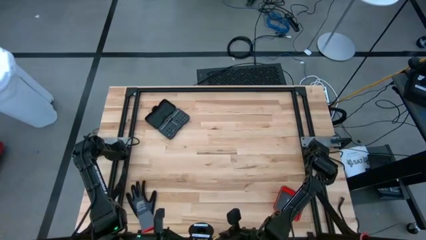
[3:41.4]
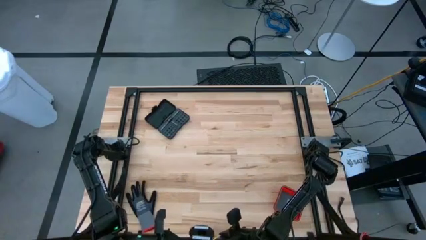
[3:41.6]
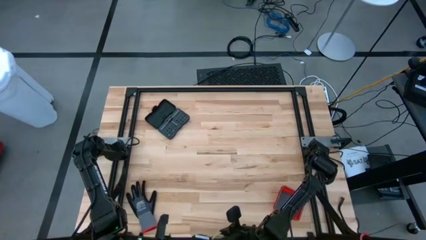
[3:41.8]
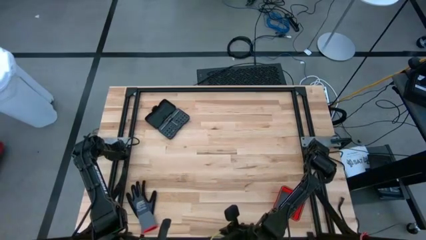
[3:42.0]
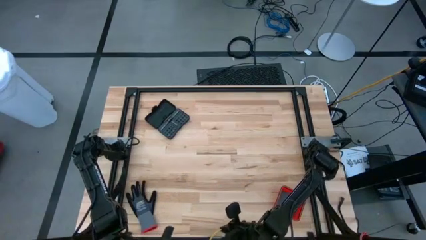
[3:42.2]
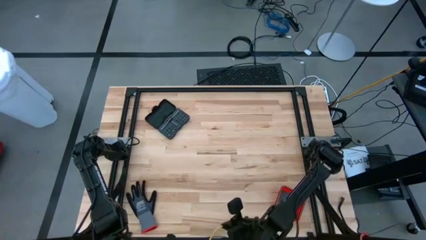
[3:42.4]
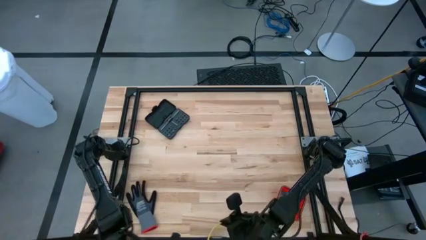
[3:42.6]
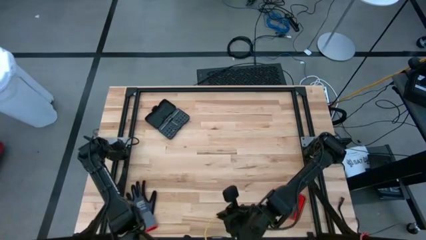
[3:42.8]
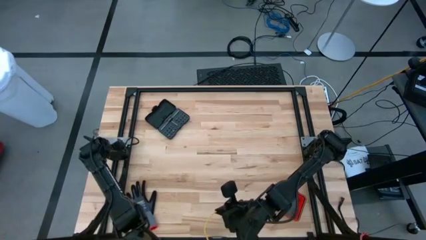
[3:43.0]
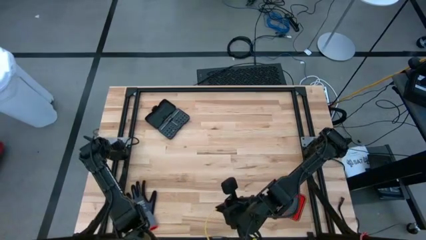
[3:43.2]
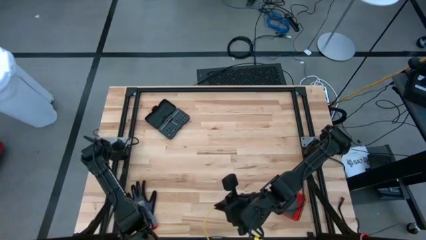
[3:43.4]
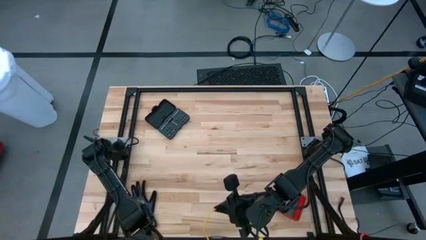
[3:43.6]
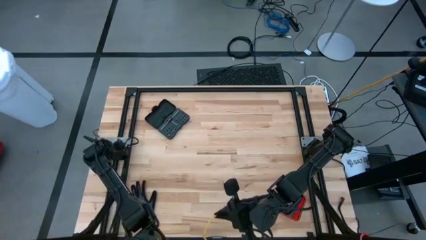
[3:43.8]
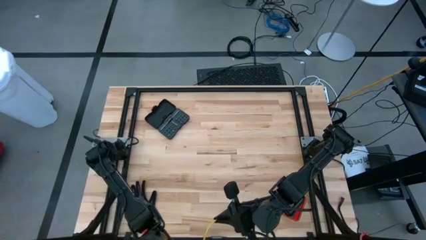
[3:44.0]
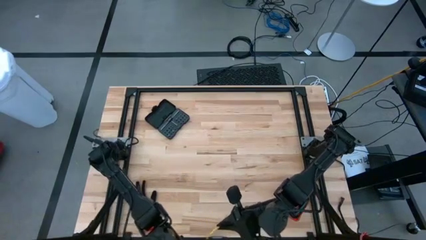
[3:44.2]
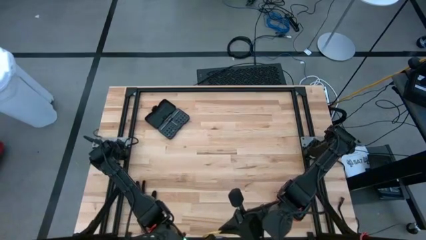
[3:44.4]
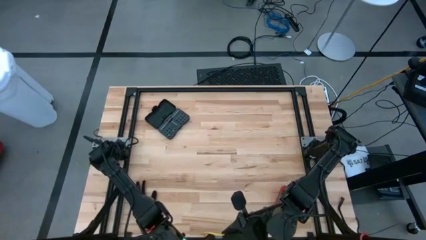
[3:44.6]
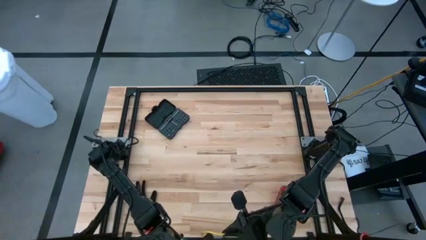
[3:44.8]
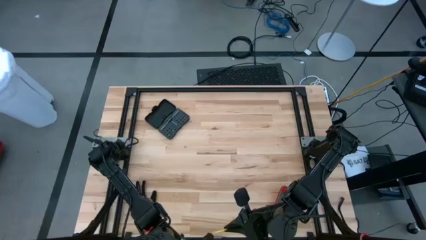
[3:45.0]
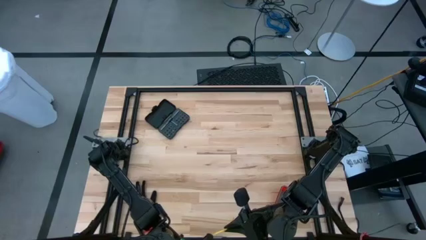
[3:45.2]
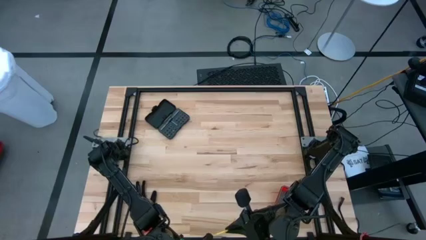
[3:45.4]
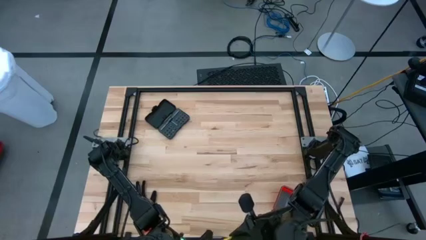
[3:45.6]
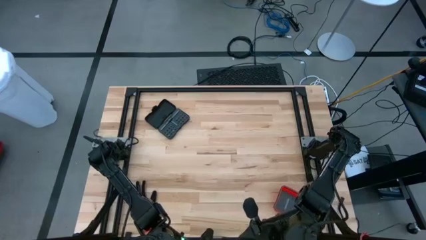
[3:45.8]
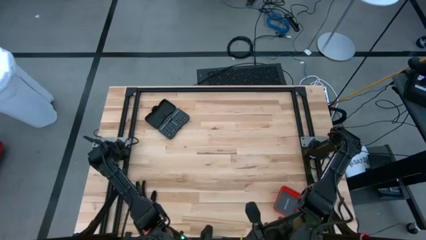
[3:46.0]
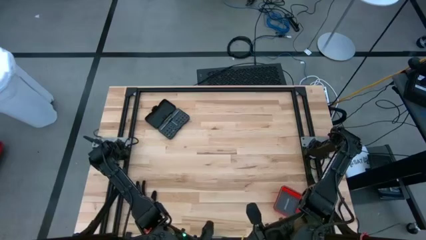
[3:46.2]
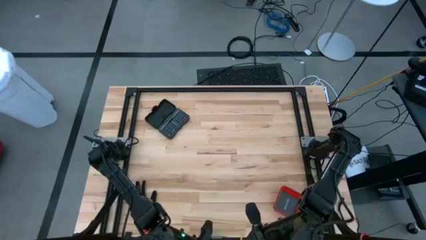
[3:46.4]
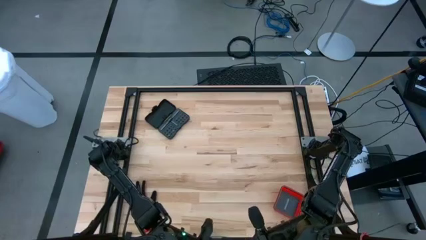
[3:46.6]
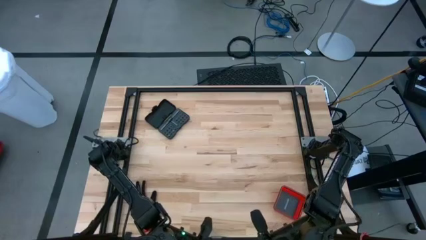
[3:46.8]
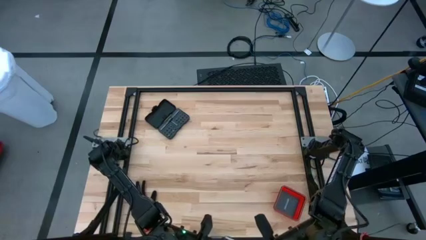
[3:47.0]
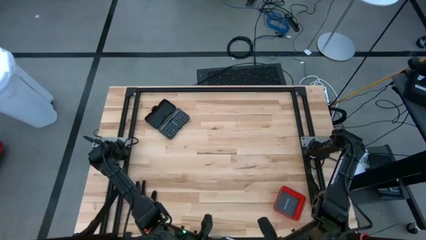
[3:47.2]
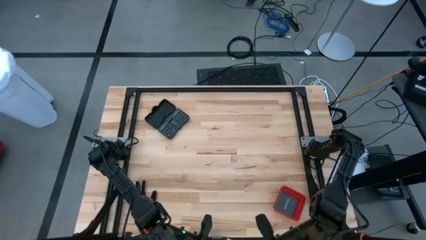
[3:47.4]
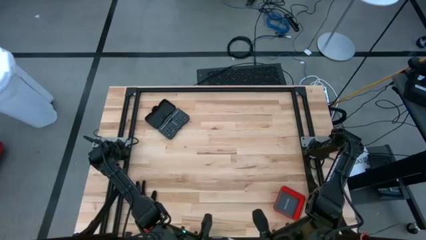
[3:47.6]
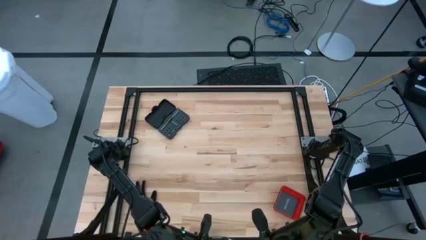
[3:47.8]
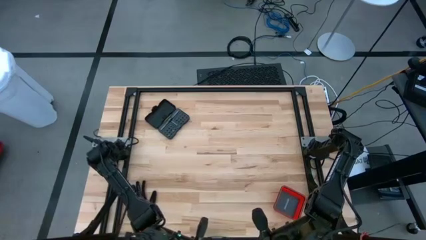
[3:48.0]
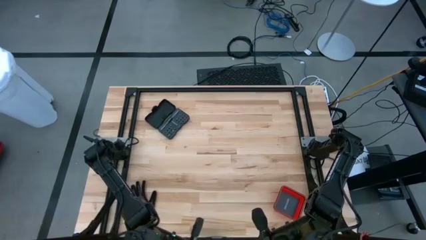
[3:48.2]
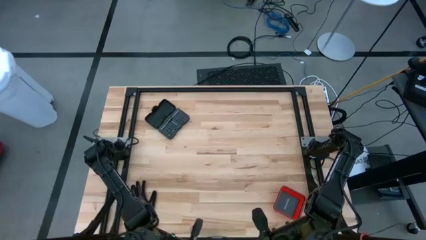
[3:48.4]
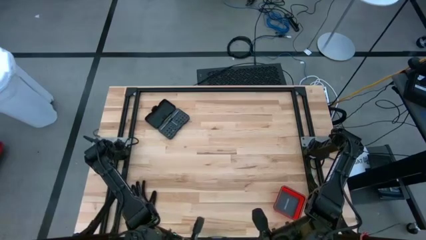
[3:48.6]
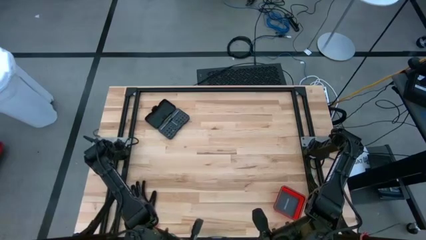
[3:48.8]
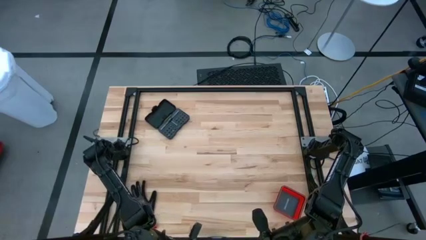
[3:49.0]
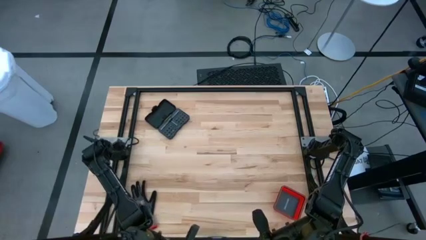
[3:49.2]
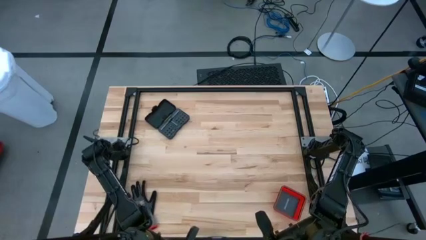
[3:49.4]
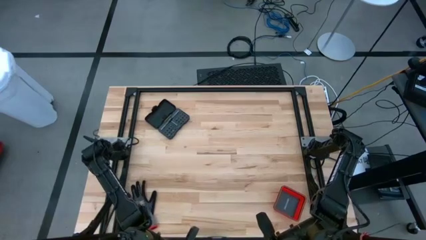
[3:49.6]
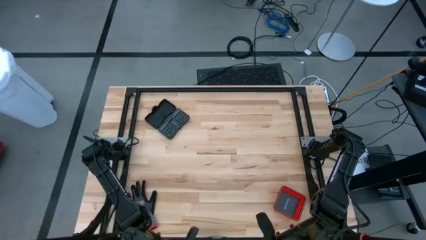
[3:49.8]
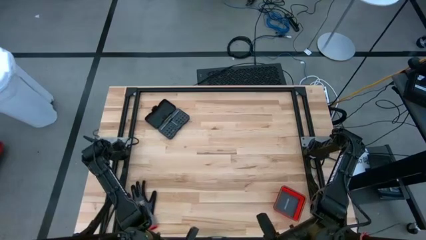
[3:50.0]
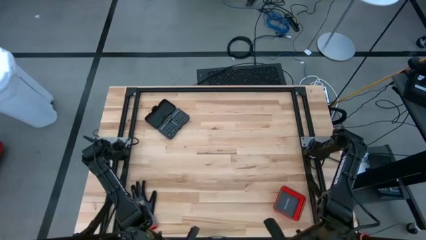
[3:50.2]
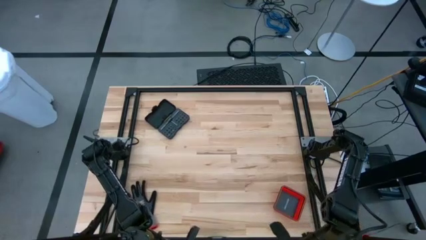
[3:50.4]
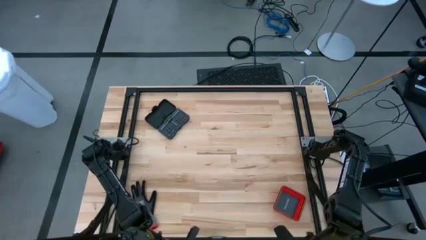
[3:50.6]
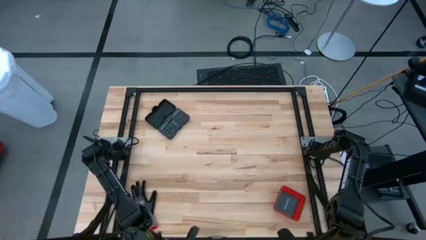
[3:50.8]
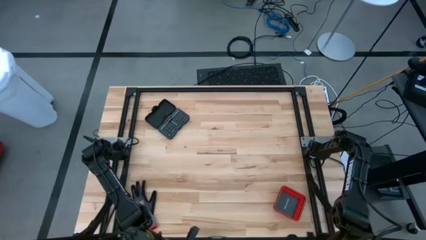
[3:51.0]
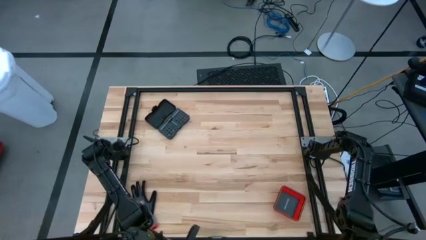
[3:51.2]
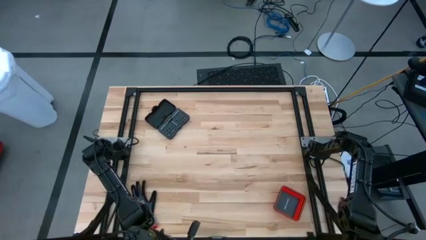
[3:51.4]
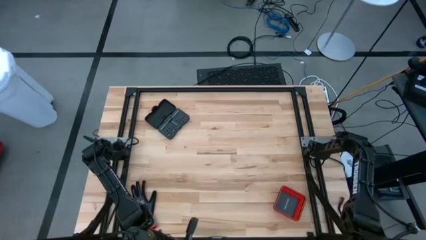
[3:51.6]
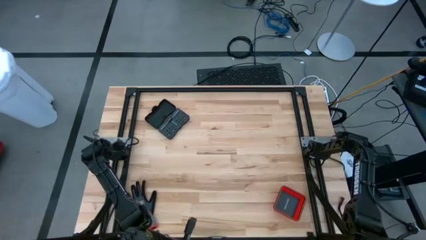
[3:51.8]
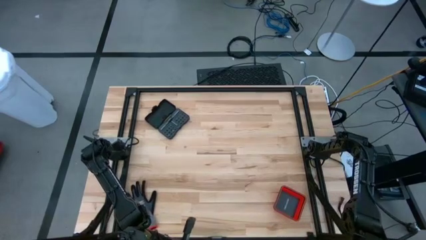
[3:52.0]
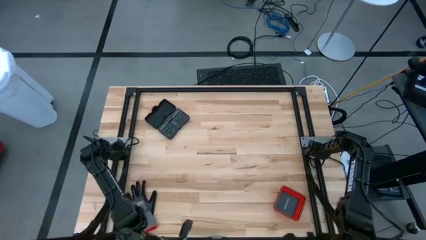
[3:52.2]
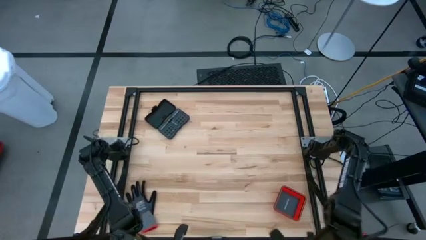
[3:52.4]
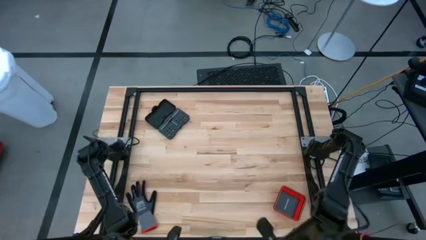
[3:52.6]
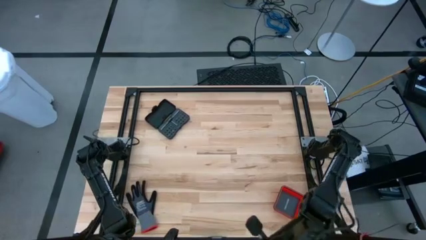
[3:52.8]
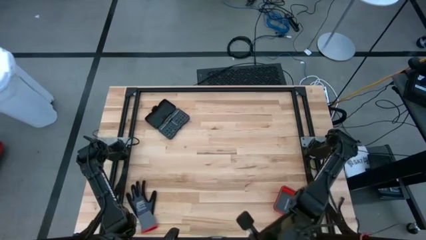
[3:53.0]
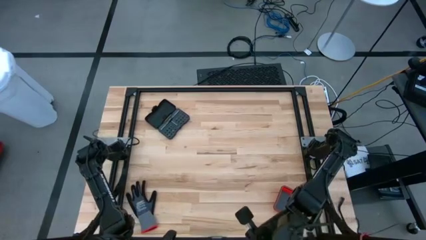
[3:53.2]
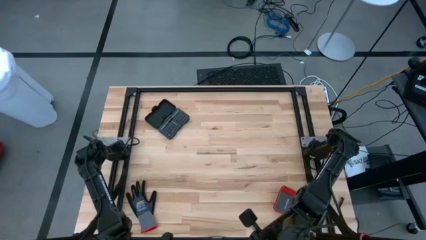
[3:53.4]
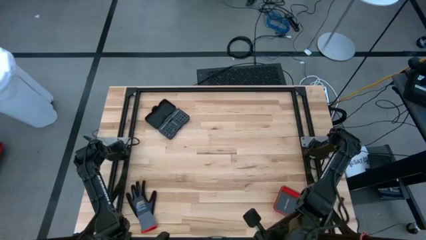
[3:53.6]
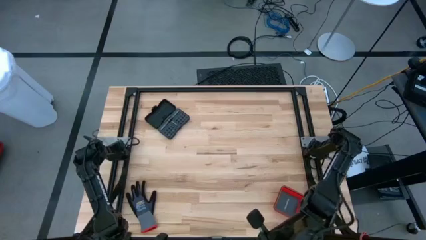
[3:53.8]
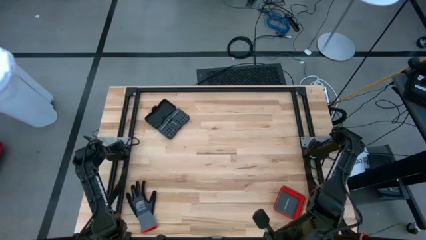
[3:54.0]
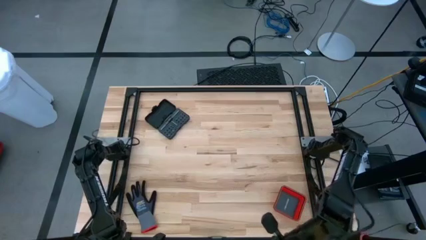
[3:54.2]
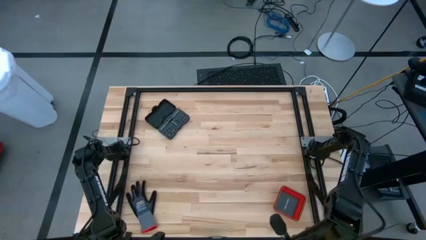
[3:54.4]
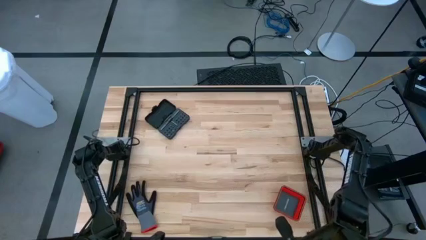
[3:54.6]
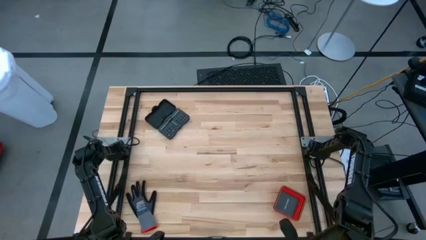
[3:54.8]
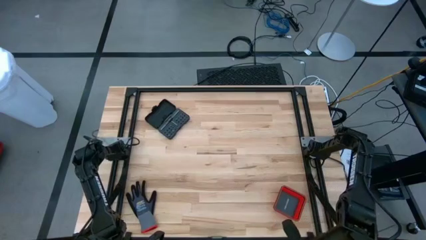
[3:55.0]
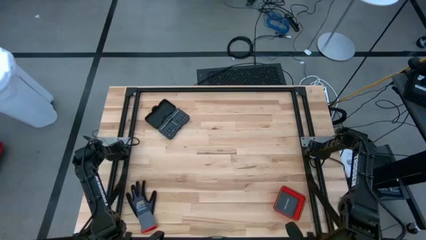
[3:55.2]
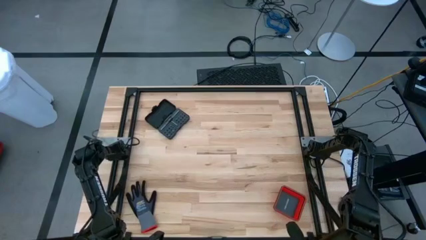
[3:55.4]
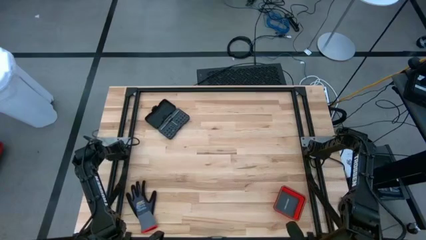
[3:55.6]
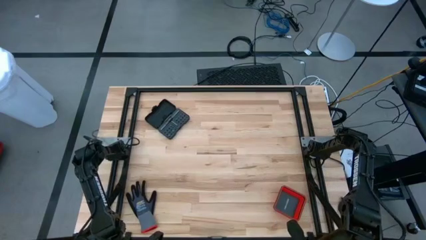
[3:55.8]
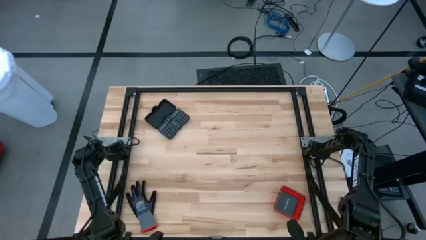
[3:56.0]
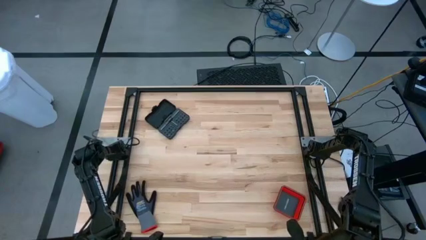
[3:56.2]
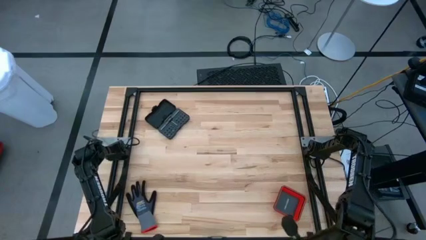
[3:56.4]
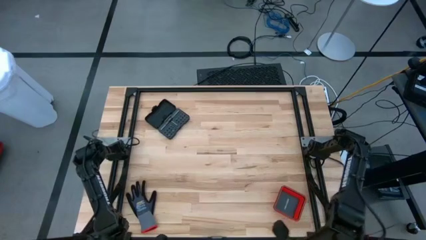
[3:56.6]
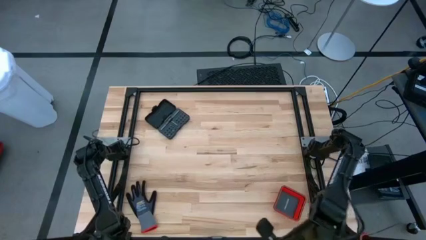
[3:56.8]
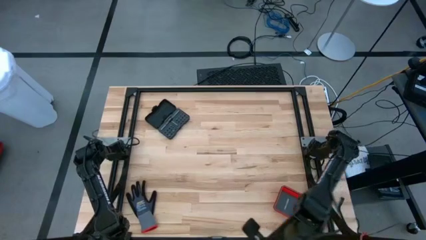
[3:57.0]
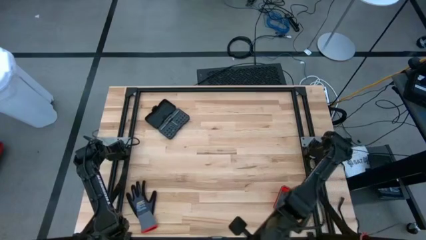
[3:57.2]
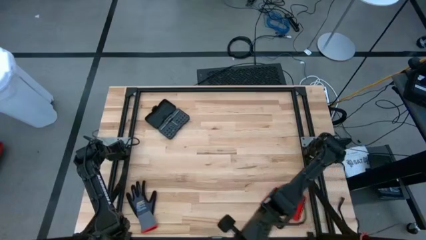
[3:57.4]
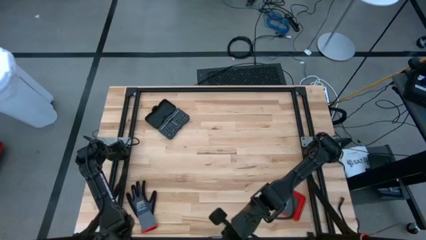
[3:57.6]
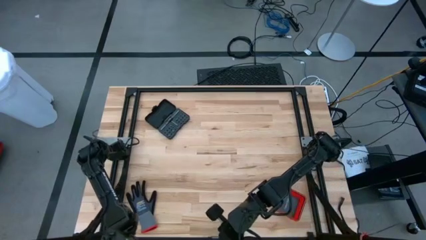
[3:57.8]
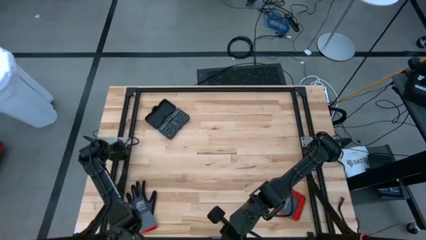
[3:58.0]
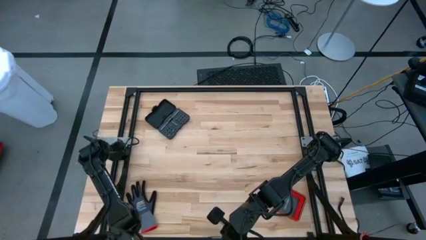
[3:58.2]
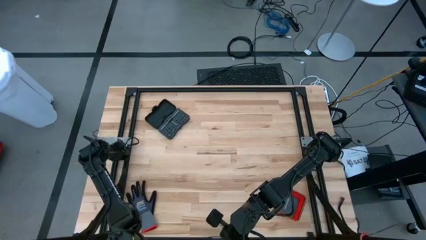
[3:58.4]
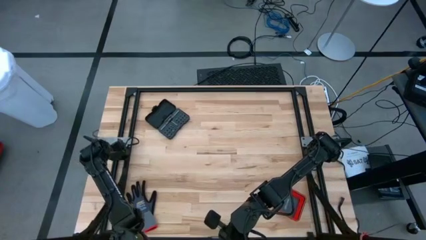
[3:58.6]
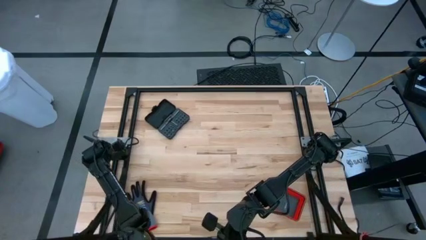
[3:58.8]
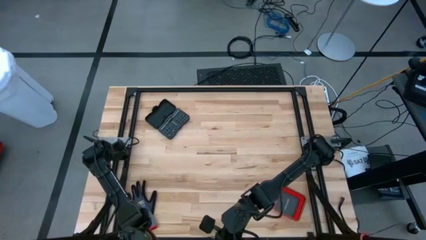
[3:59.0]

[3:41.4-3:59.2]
Task: Coil cords
Coil the yellow wire onto the spool
